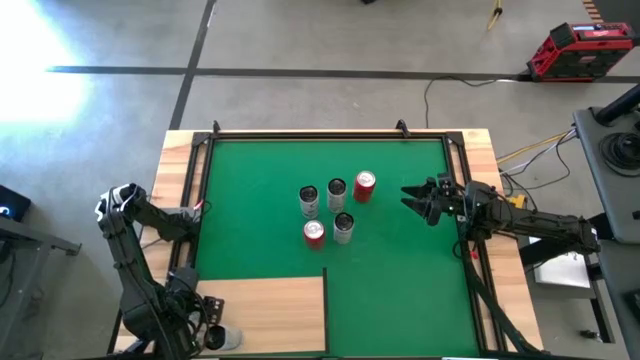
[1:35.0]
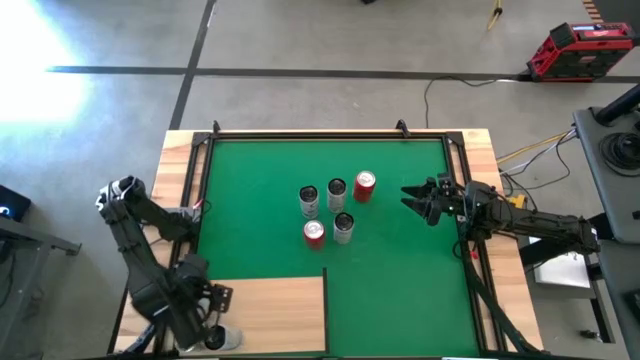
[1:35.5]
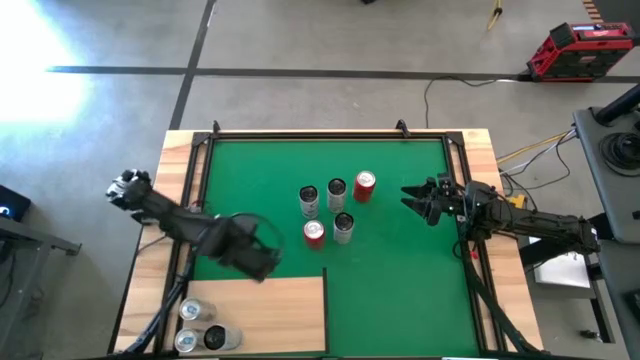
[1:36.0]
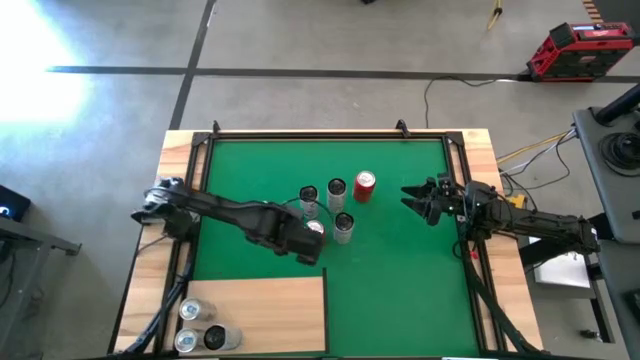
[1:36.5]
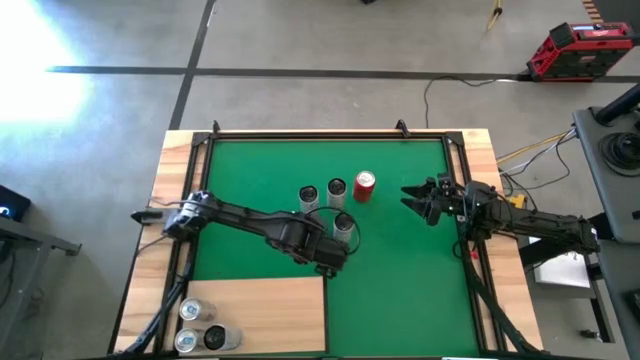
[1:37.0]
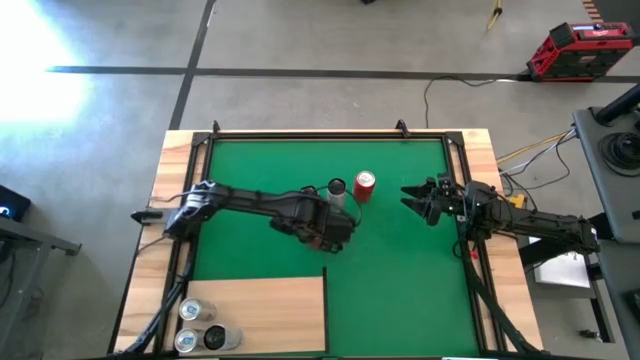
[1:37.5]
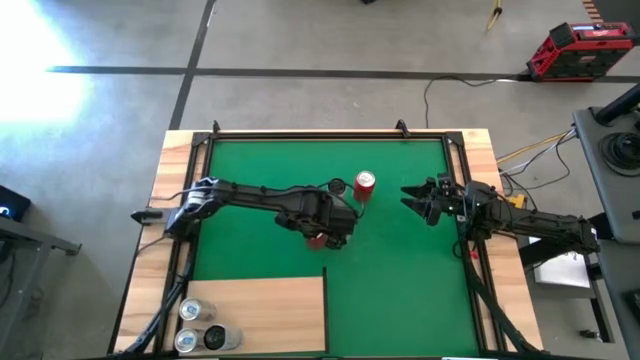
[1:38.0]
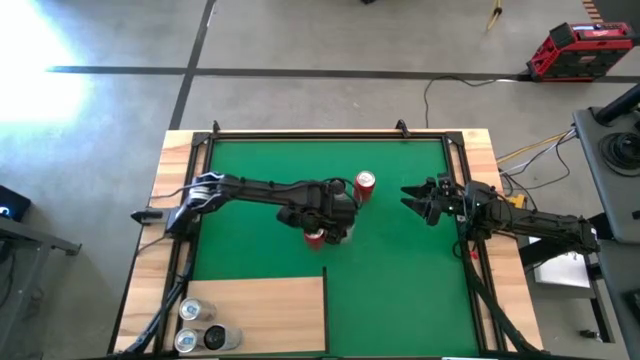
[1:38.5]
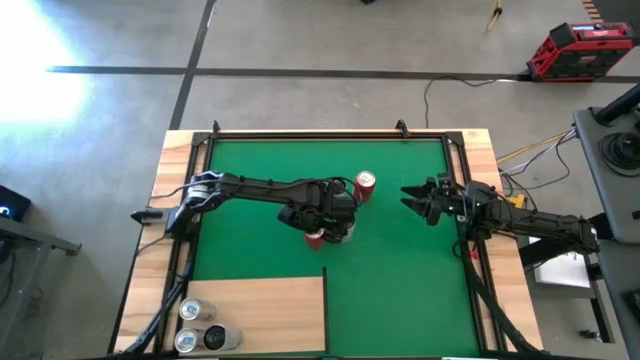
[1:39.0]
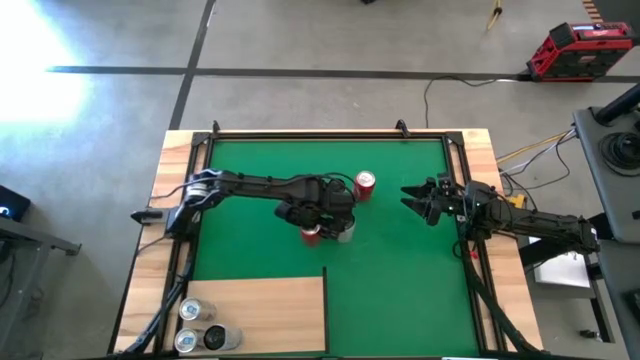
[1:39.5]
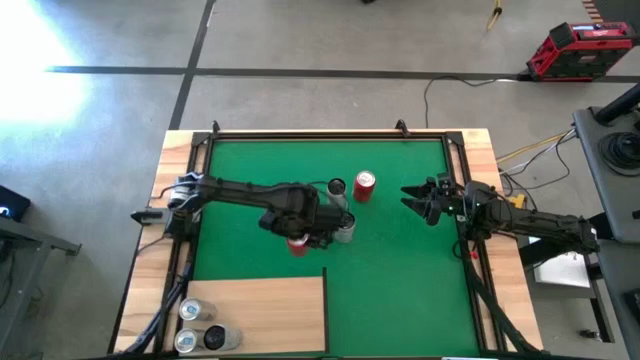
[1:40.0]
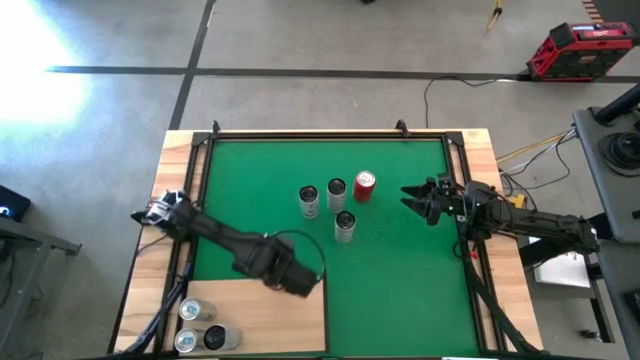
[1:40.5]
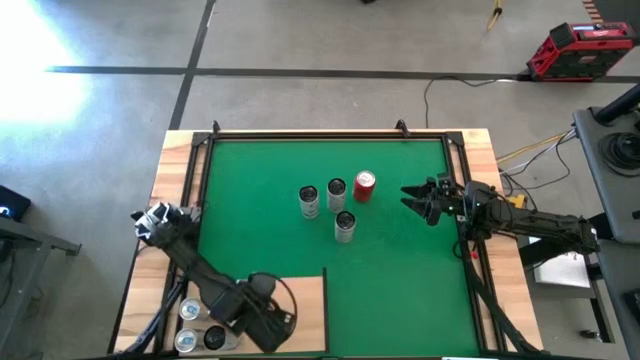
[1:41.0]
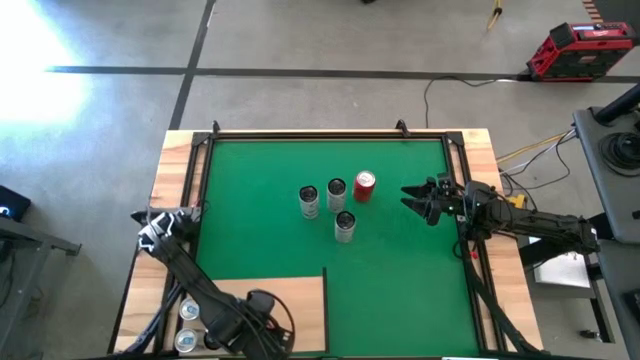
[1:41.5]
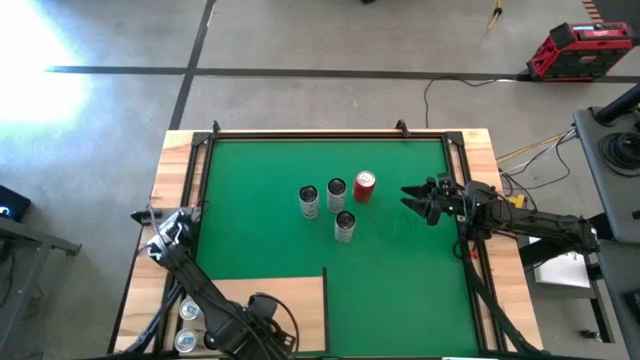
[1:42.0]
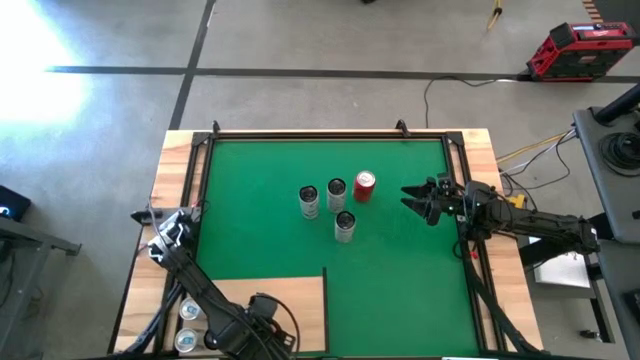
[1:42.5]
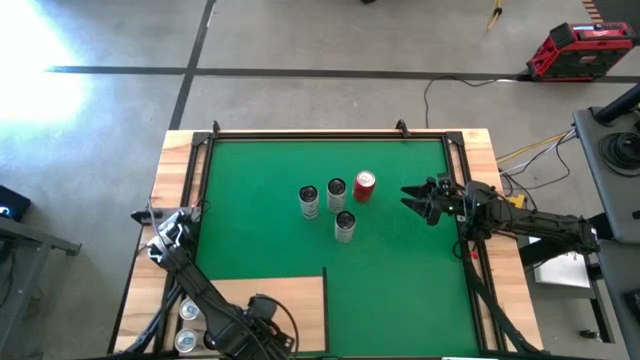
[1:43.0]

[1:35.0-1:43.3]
Task: Place canned beverage on shelf
Put the bottom red soda can on the shelf

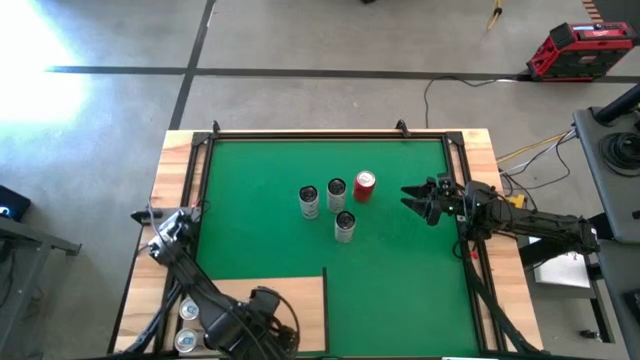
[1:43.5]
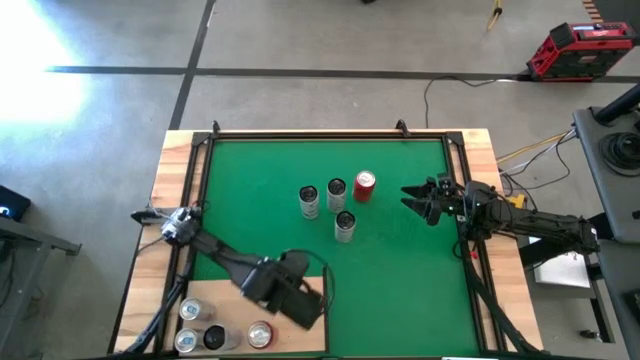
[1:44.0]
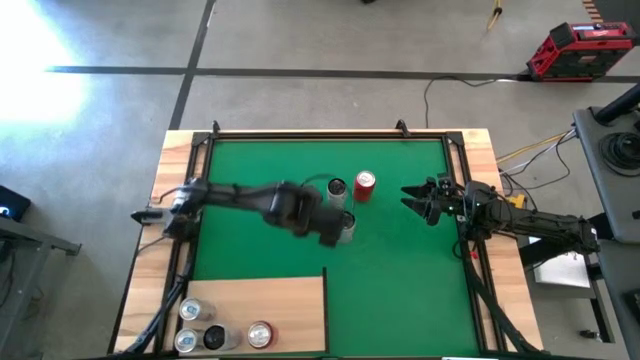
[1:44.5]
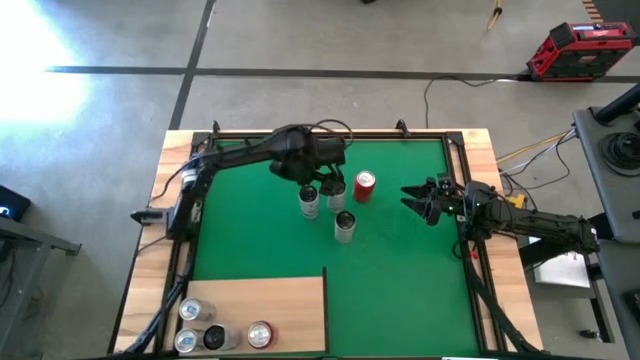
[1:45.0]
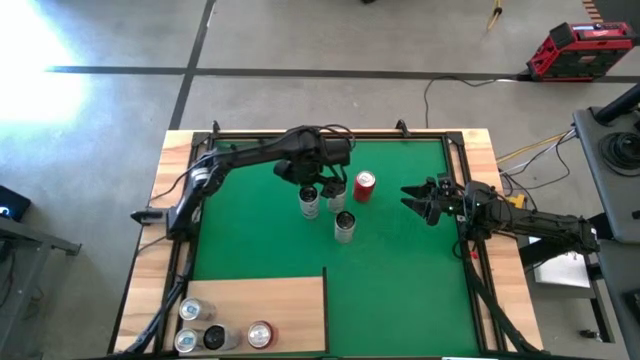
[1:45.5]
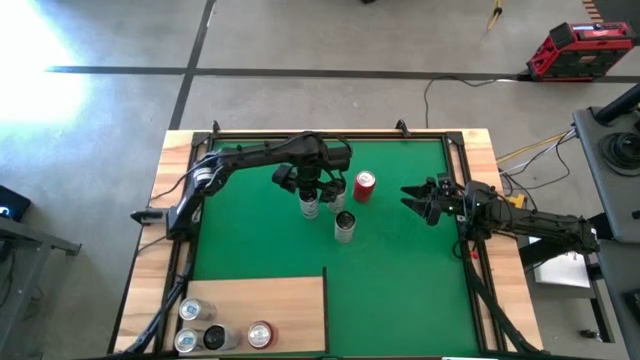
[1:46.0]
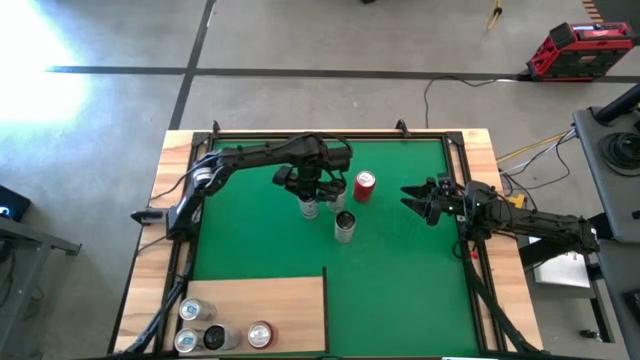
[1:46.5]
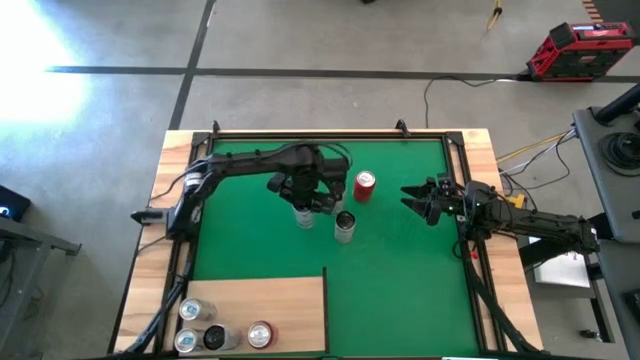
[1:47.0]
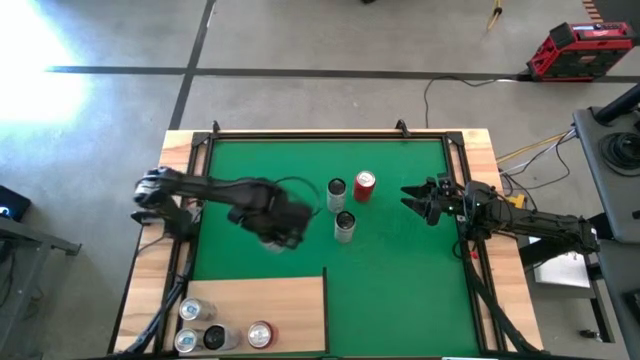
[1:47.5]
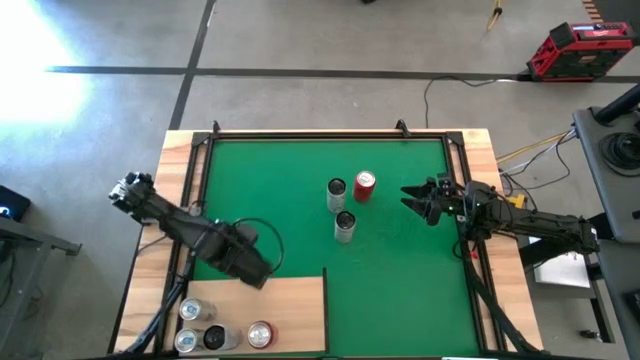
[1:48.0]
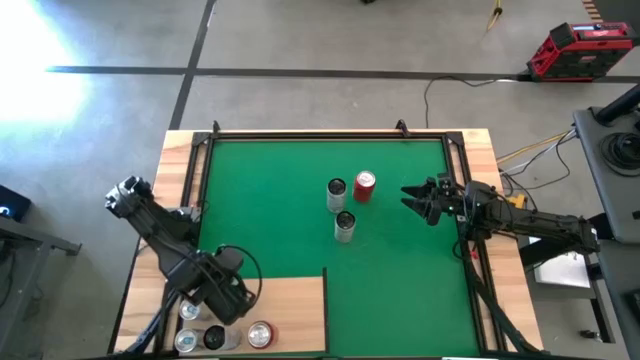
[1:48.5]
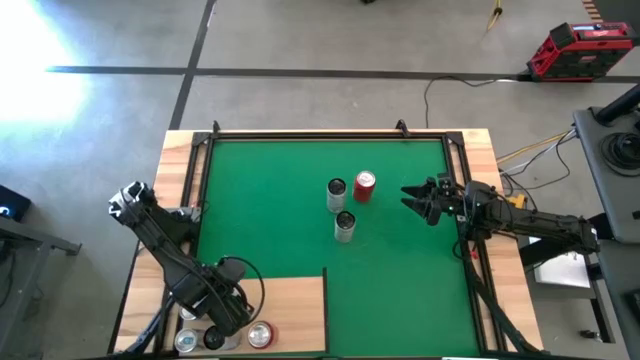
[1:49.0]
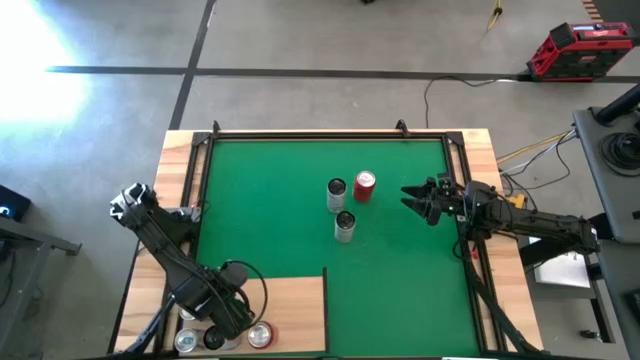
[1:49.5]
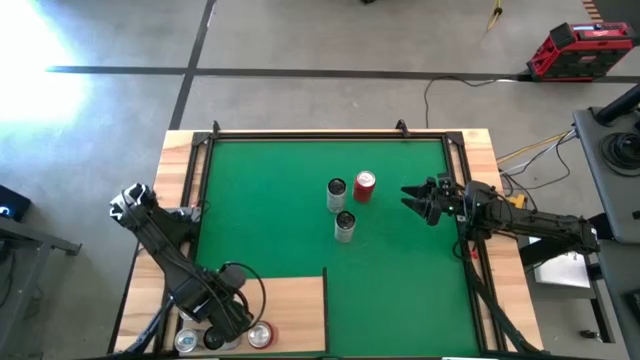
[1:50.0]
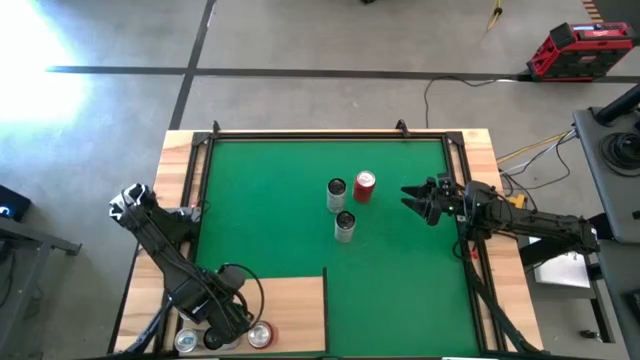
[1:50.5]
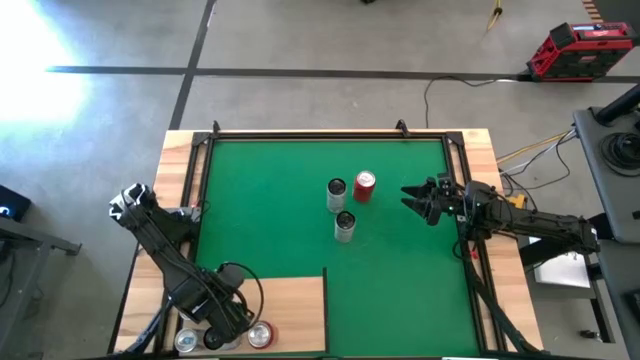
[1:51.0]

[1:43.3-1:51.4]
Put the white and blue soda can on the shelf align with the other white and blue soda can

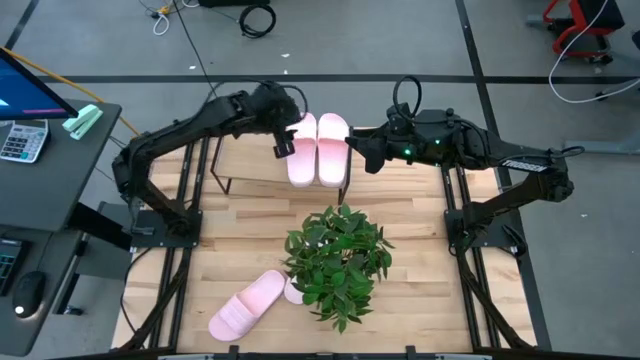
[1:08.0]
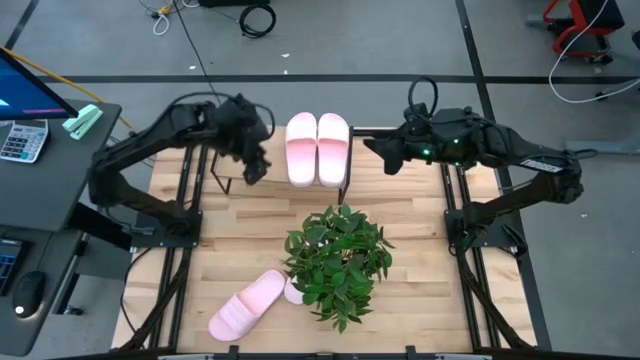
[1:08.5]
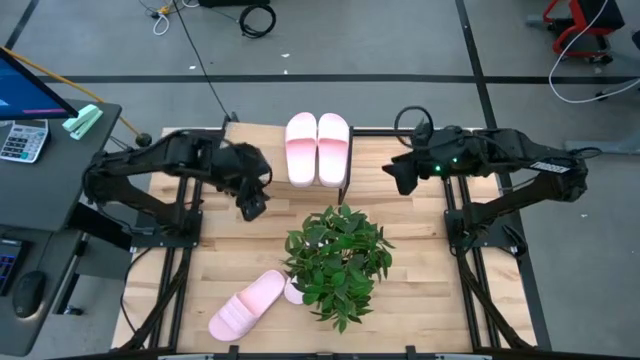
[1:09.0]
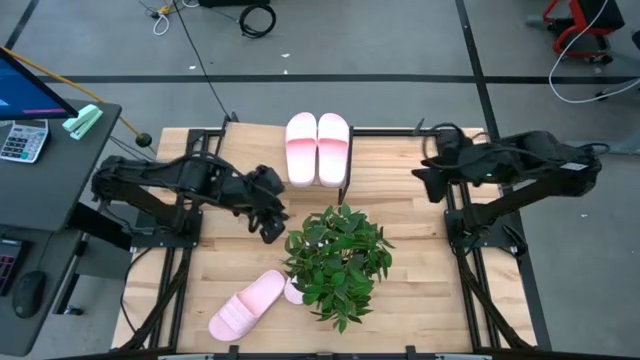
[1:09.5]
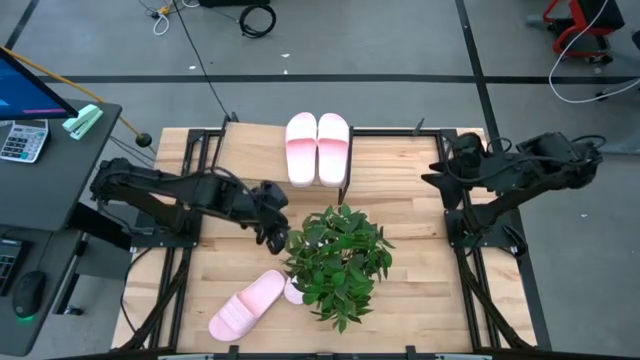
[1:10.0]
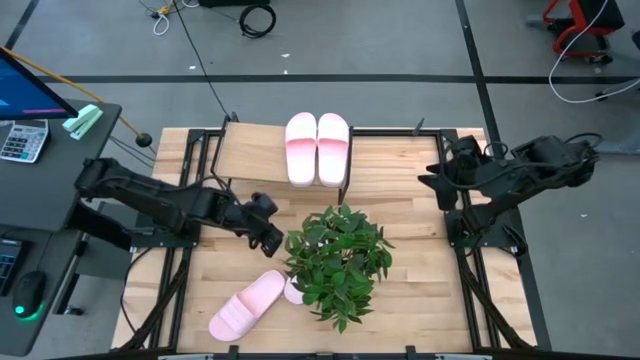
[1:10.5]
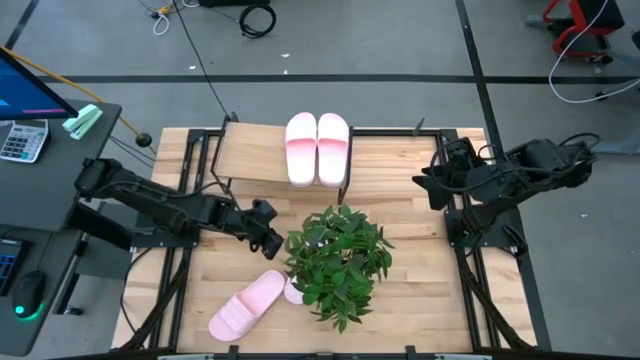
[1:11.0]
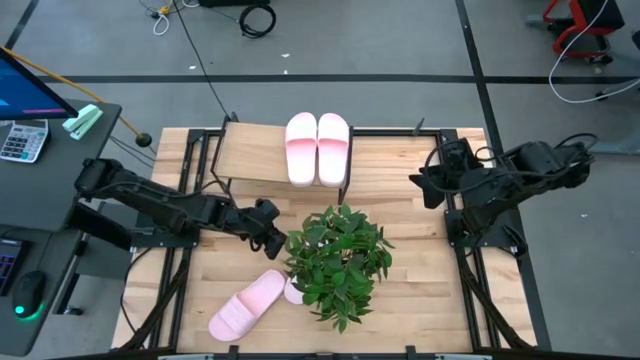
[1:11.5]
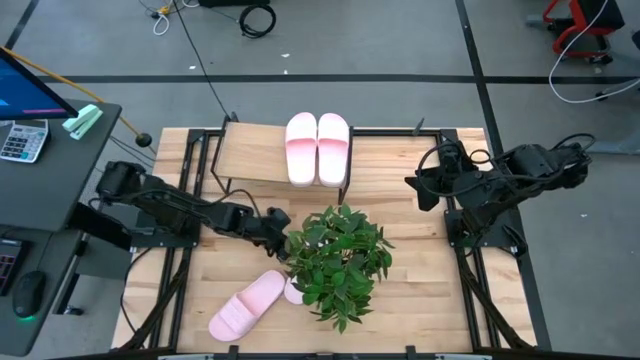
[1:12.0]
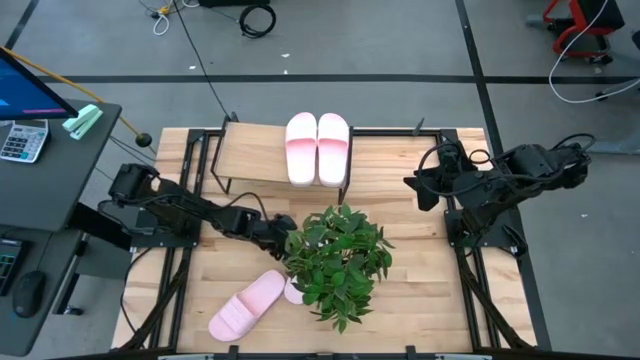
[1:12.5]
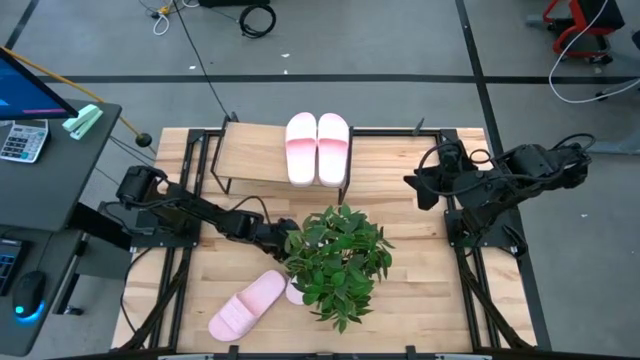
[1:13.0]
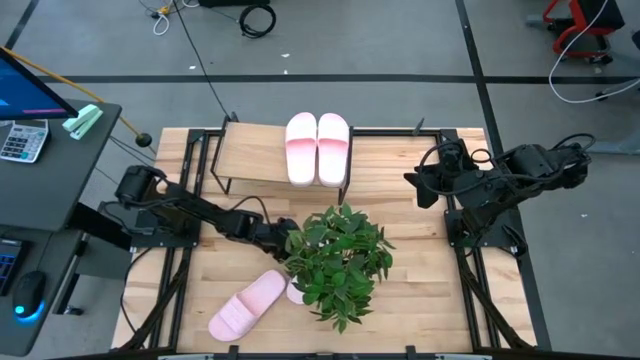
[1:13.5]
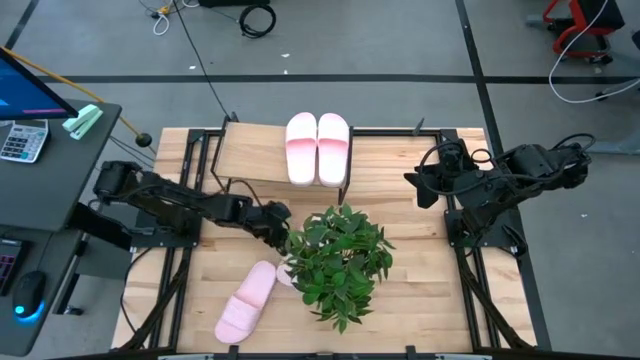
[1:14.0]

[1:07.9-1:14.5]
Task: Pick and place slides into the shelf
Put the pink slide on the shelf
